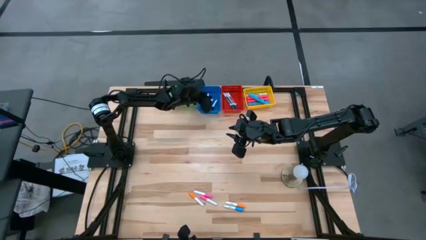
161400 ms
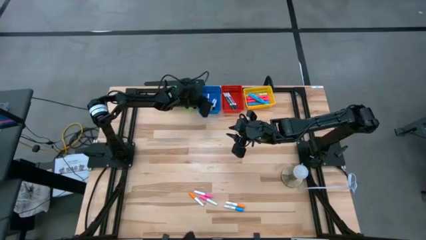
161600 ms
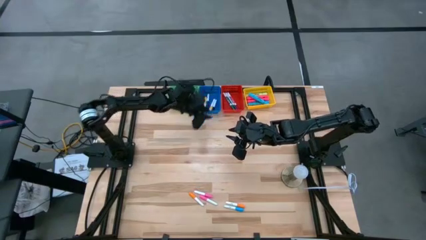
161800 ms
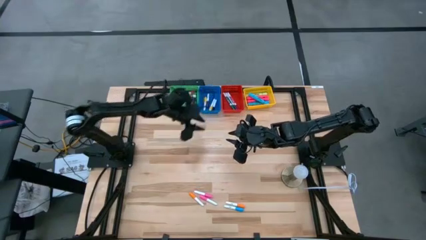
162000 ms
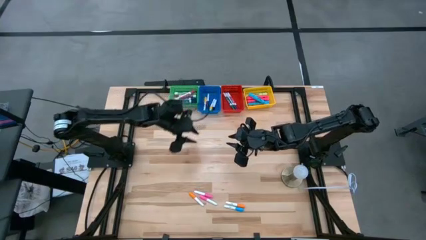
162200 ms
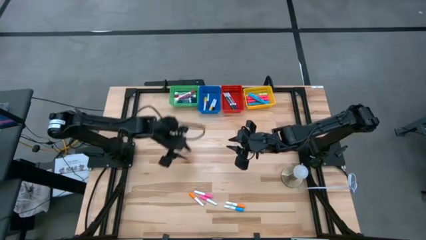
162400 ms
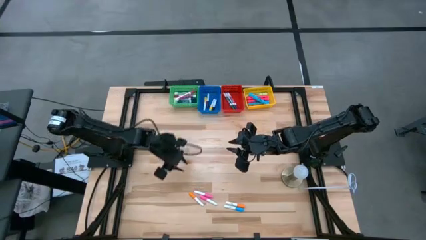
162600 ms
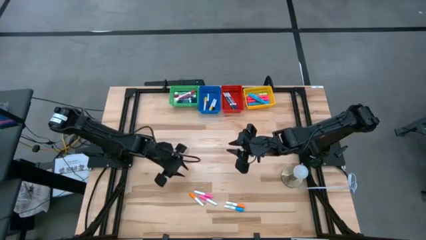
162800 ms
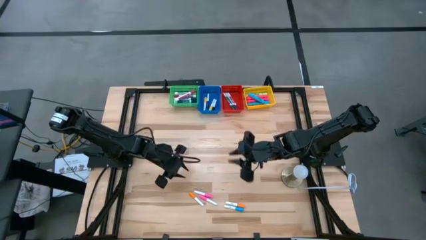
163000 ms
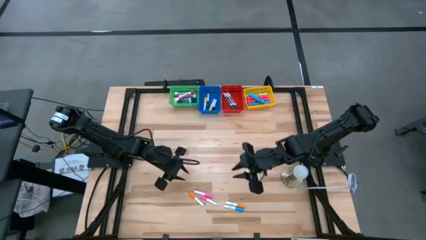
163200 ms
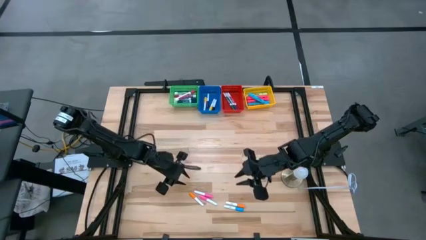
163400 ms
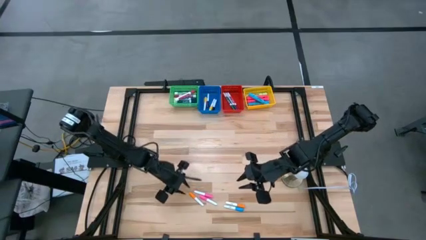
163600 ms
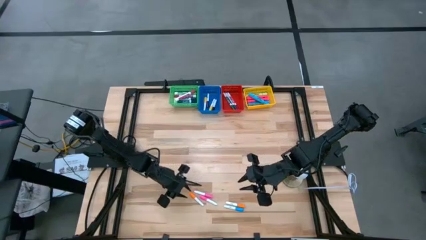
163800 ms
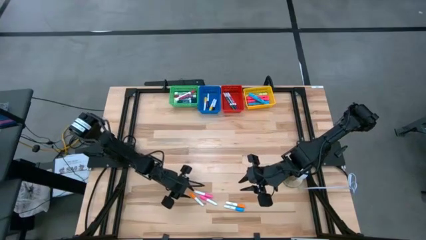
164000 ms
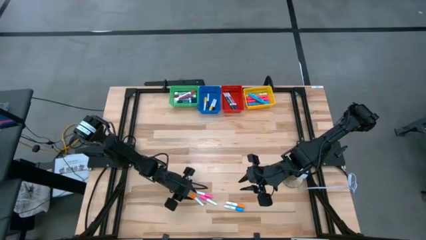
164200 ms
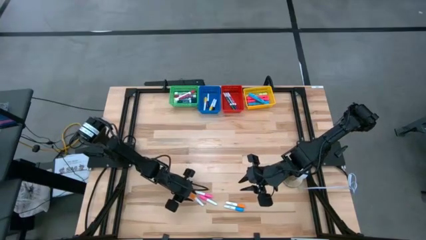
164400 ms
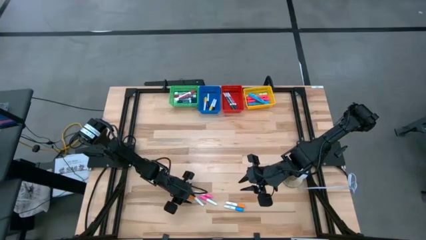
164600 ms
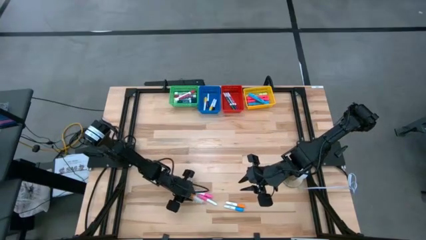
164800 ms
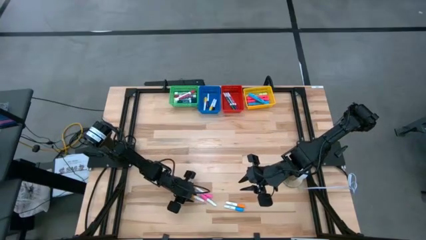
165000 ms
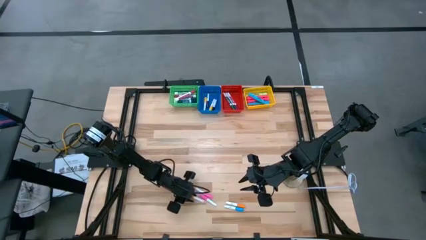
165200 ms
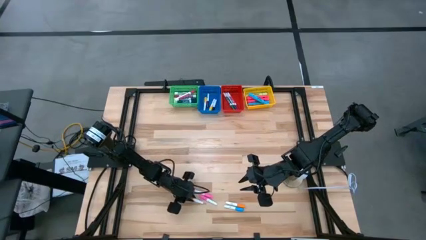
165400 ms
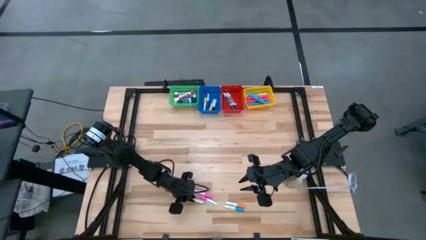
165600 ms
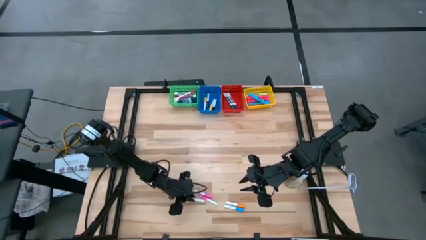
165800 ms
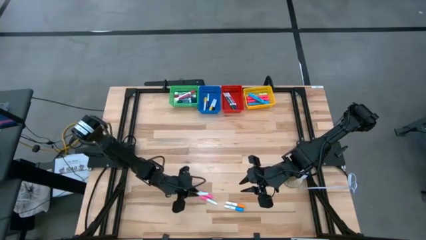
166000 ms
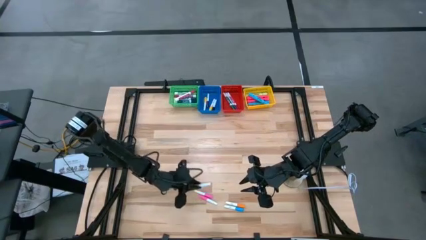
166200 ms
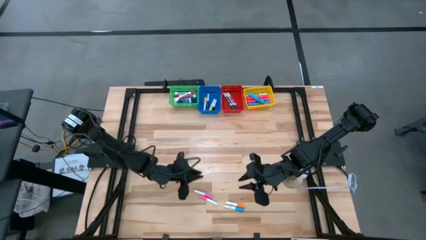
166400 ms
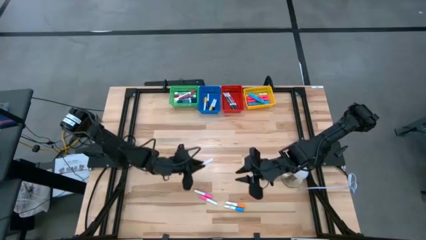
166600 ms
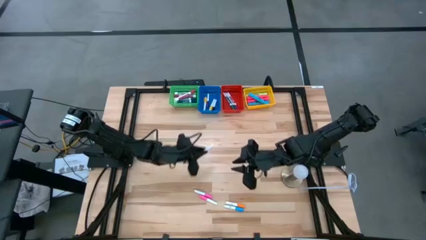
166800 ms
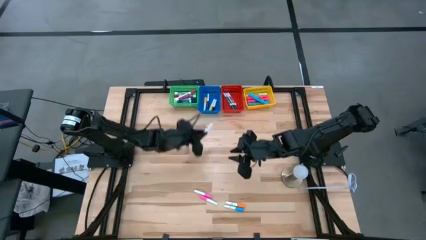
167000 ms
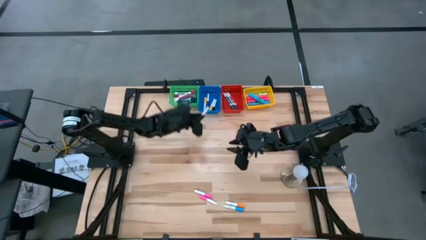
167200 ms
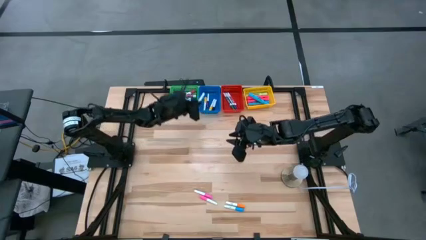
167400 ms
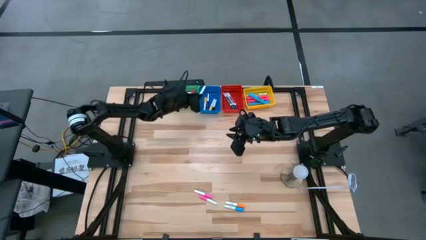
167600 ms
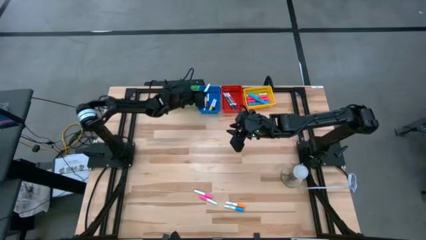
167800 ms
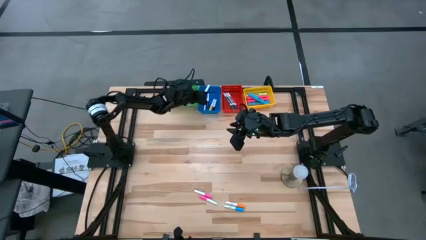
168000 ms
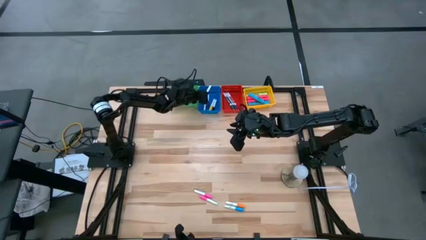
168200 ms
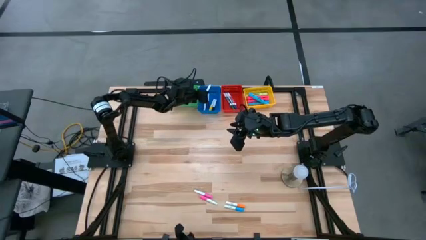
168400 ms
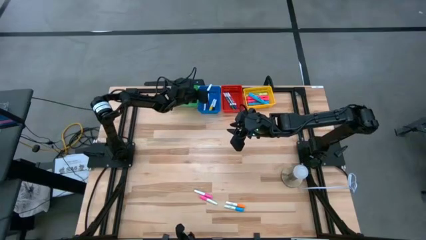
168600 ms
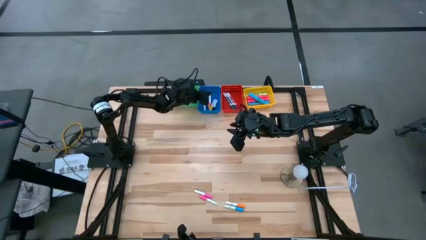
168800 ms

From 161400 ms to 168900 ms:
Task: Pick & Place Markers
Put the left small orange highlighter pen into the blue bin

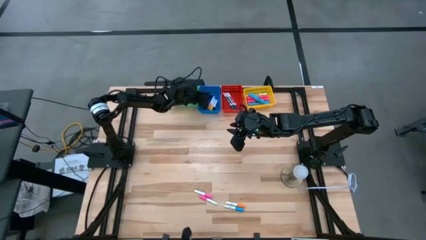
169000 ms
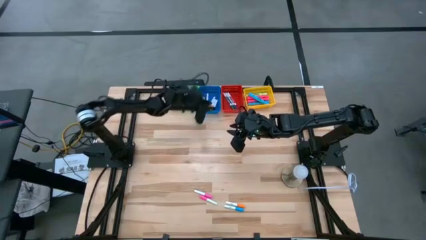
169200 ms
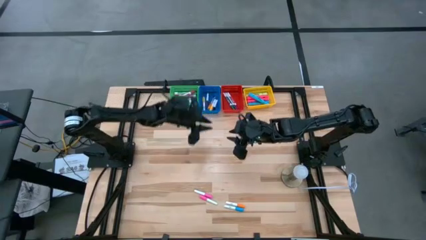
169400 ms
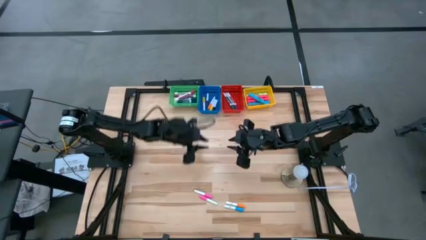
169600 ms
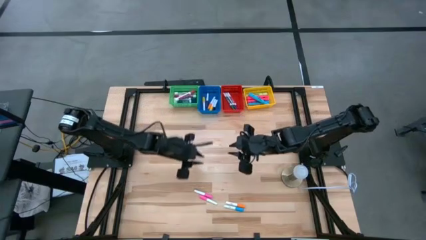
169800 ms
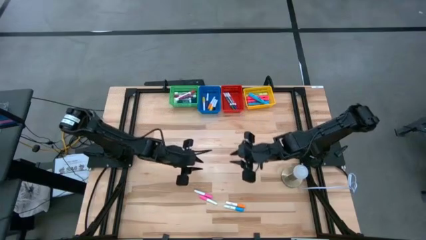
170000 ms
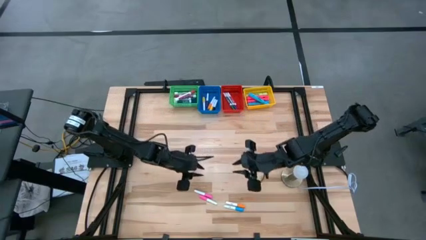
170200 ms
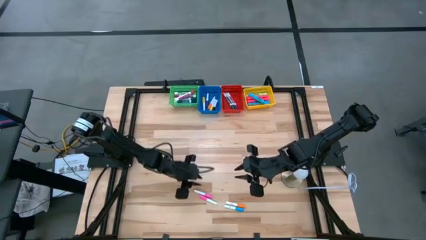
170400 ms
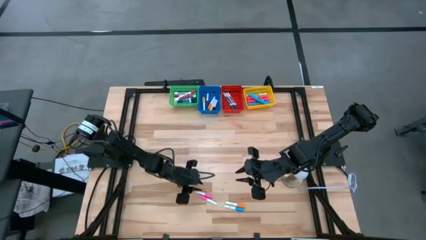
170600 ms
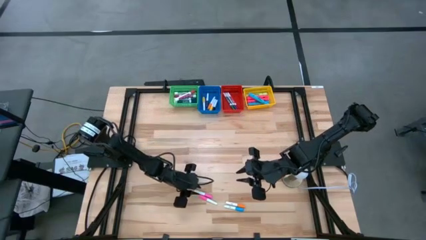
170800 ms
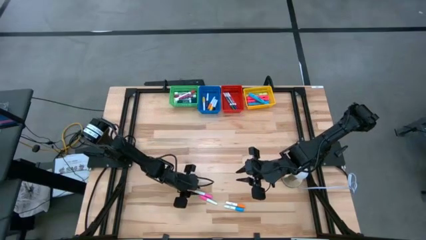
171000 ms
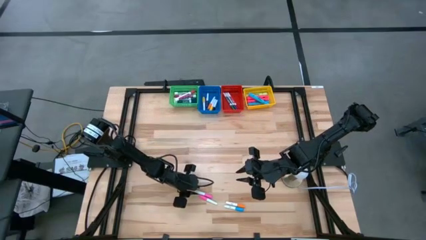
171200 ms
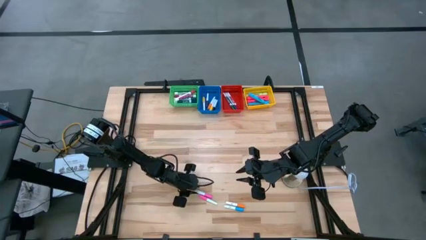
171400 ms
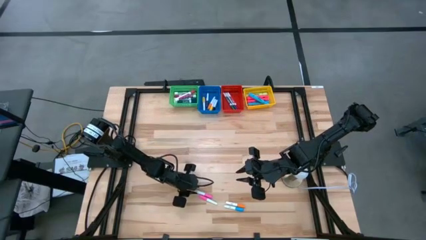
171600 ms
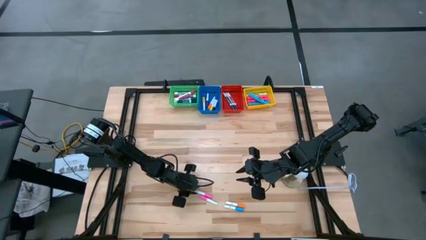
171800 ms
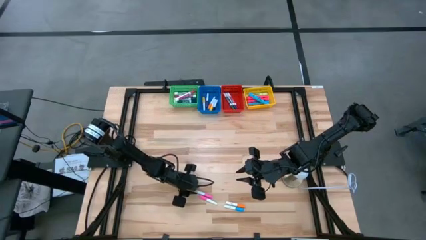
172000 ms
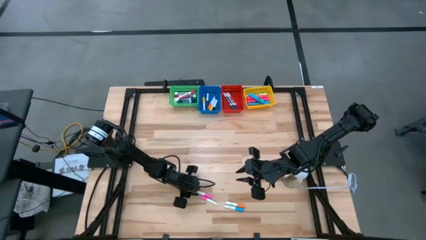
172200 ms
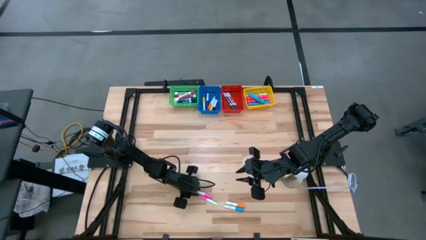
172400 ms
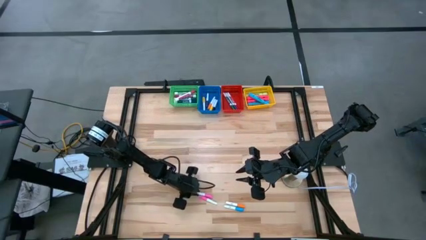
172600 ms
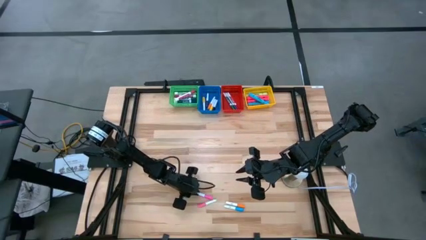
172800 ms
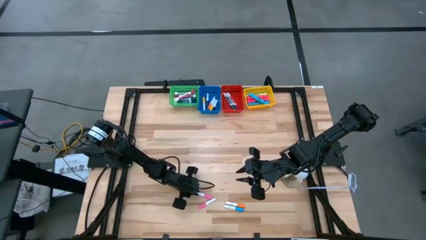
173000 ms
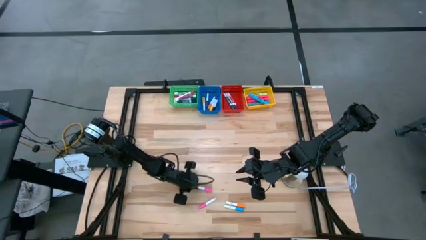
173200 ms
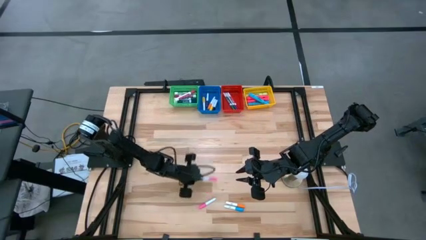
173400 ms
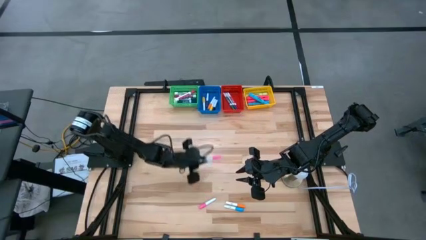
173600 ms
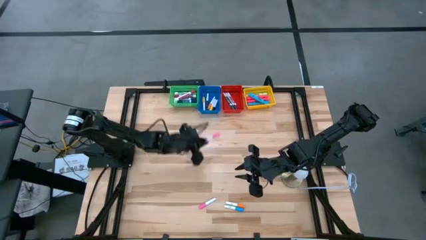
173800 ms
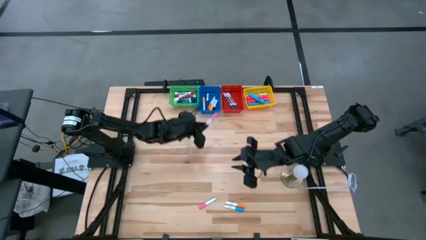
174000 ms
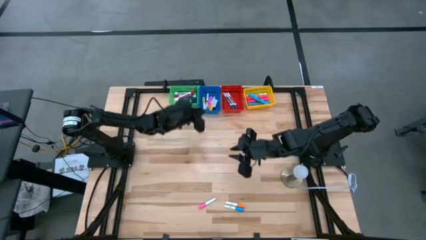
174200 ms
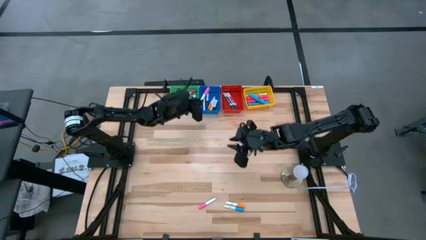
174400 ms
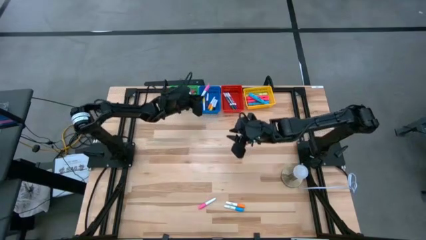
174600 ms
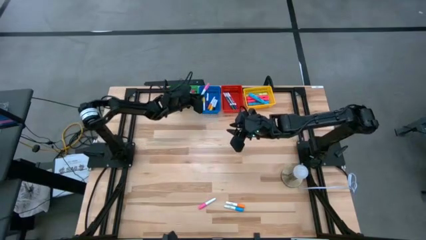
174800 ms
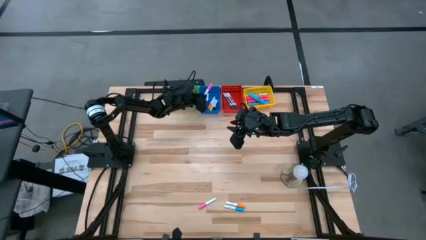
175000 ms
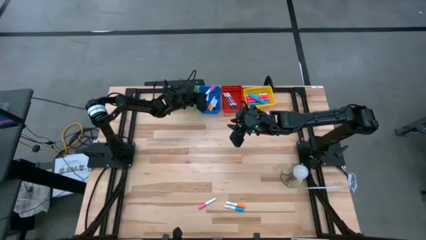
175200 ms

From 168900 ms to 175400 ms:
Put the top small pink highlighter pen into the blue bin

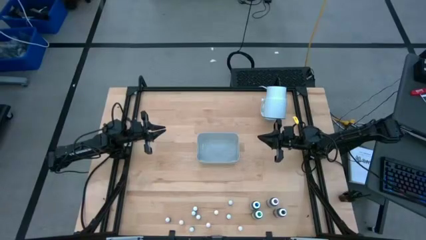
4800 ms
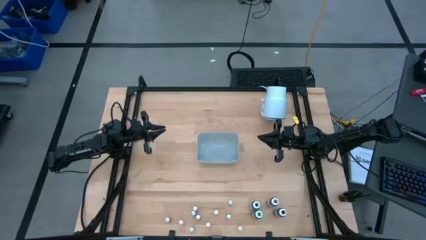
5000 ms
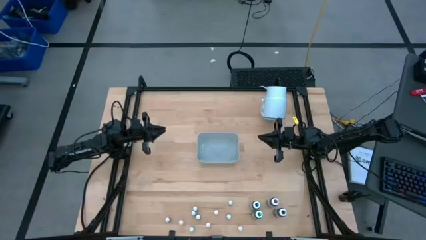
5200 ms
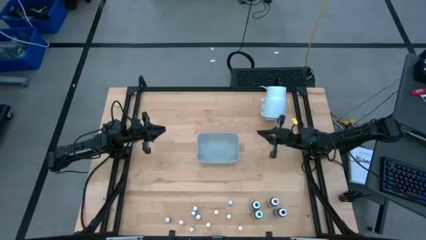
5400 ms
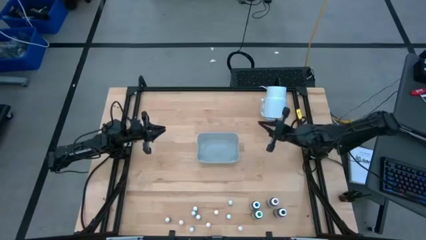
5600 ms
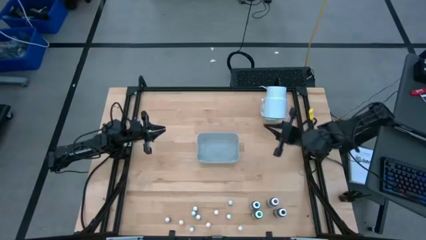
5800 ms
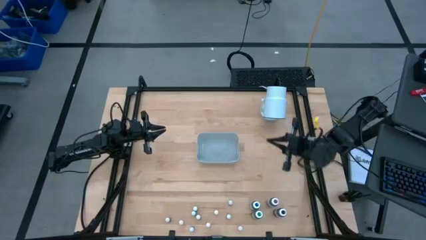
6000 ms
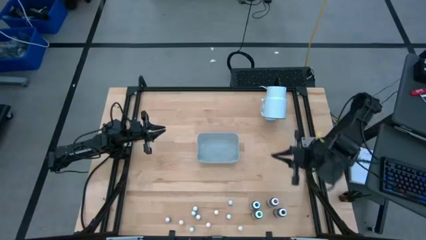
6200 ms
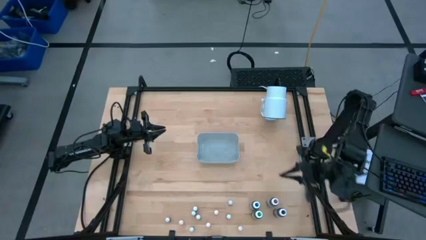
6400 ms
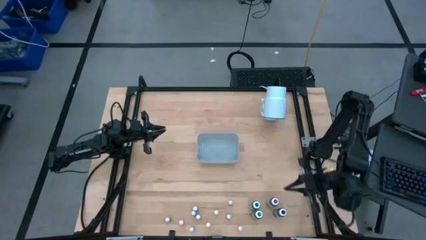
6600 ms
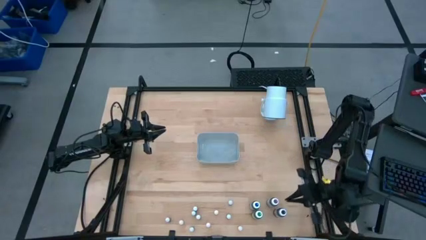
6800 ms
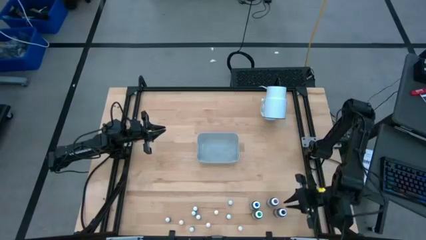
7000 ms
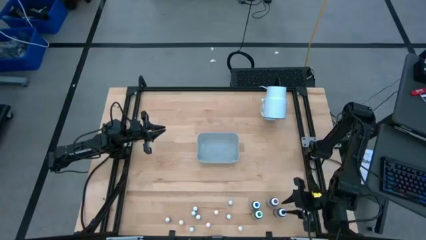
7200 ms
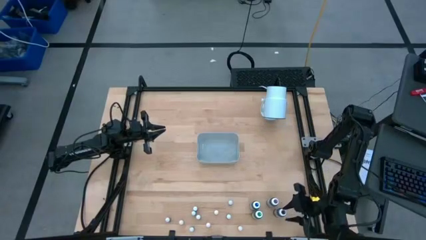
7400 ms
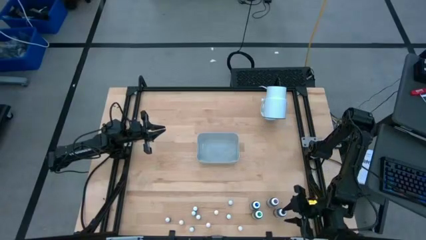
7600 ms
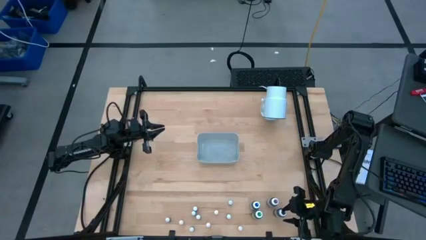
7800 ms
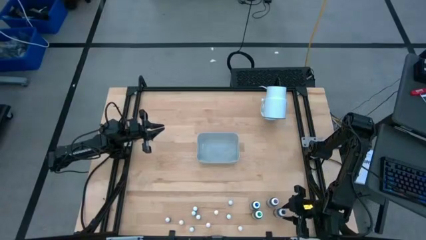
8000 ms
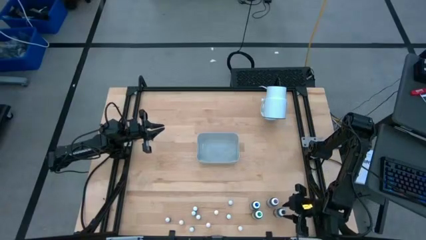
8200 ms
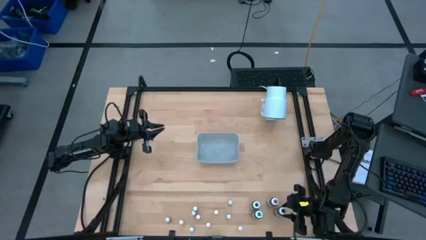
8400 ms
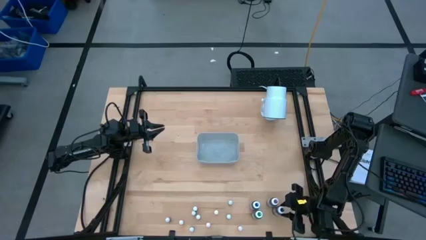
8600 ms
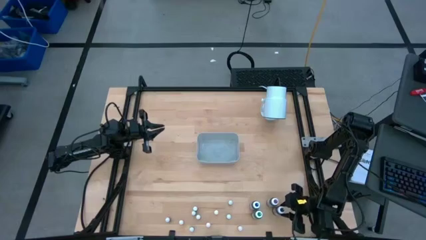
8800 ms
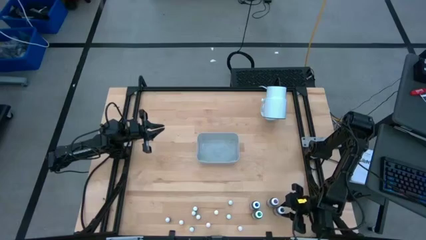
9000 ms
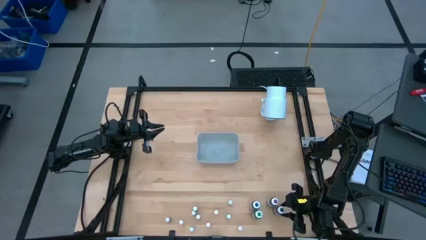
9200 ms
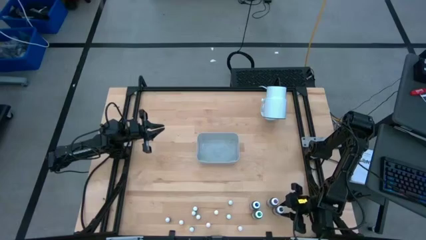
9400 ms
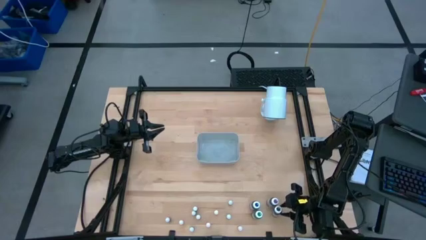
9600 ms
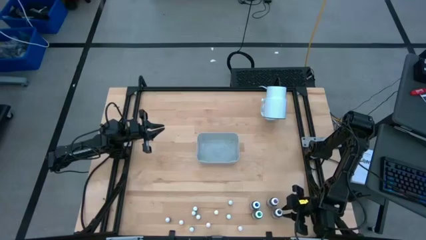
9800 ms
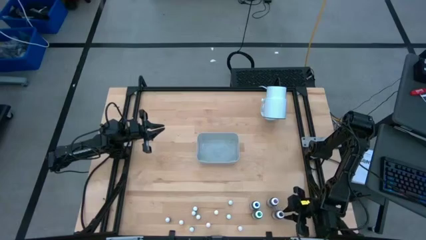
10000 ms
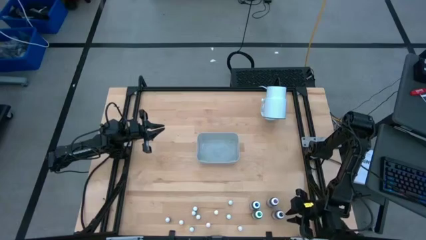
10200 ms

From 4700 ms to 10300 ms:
Task: Pick & Place food coloring
Put the large black food coloring bottle into the white bin
